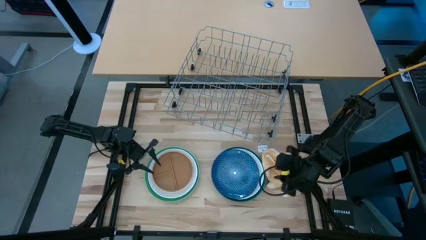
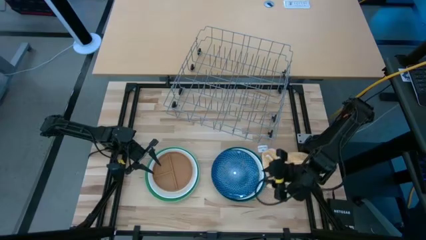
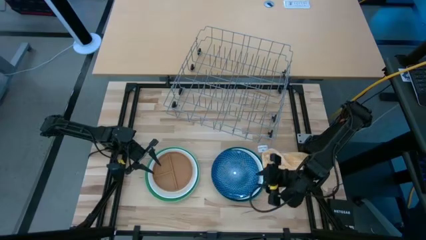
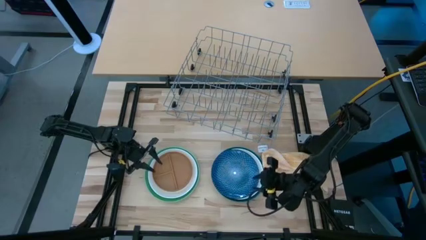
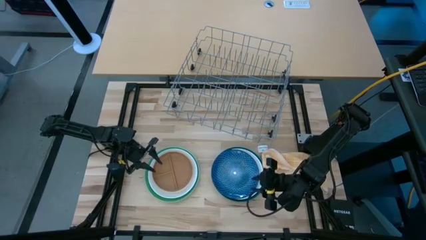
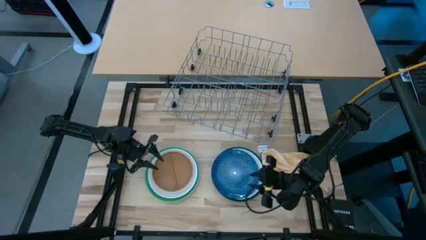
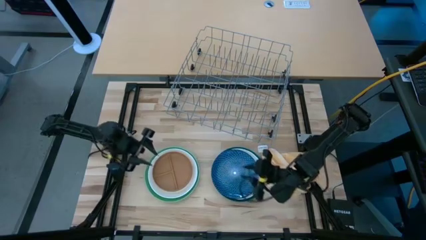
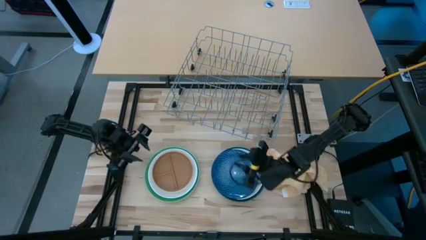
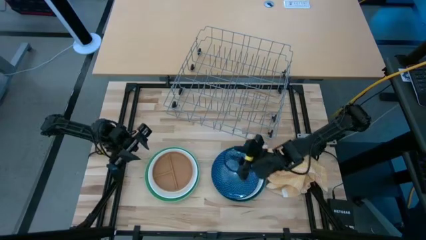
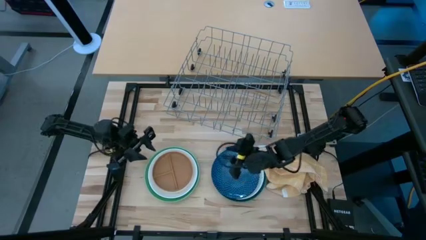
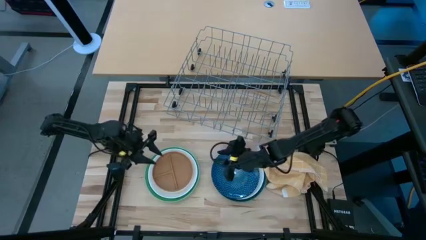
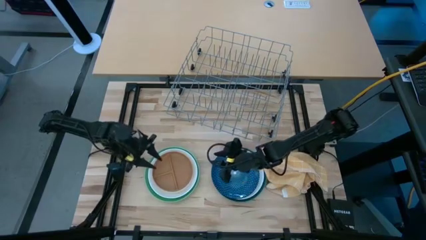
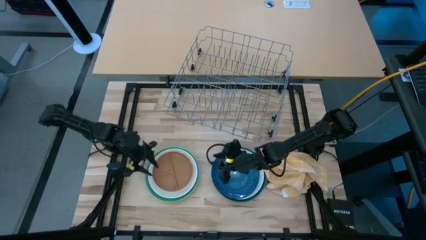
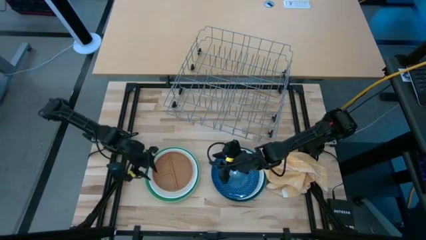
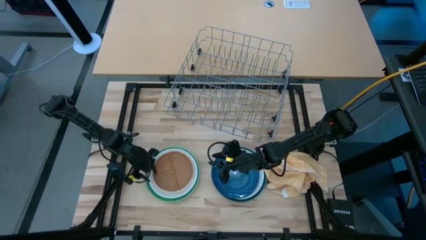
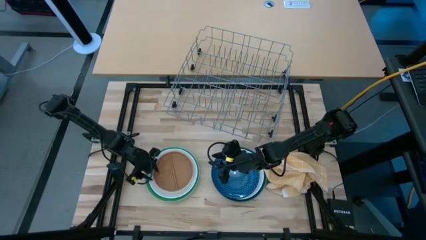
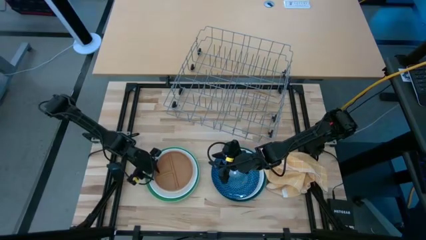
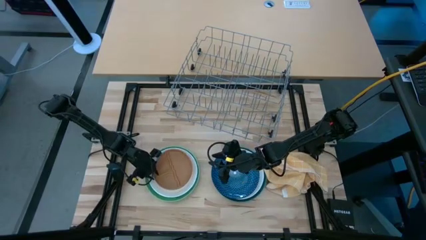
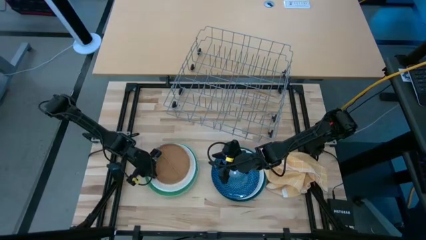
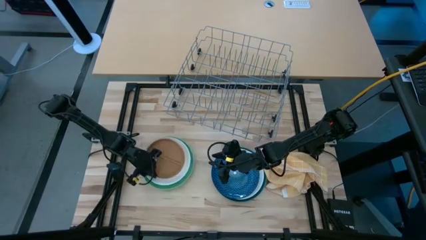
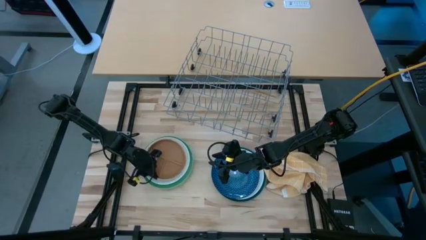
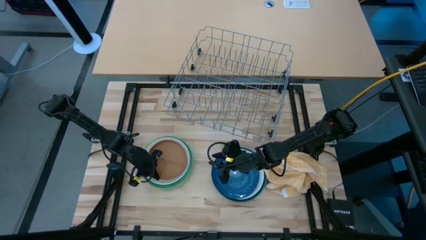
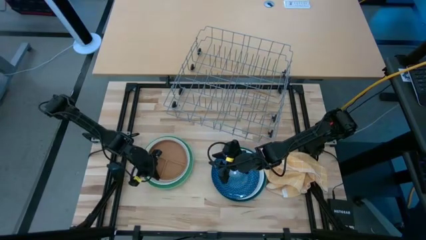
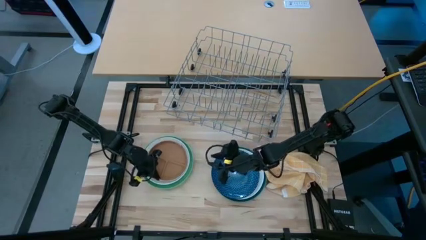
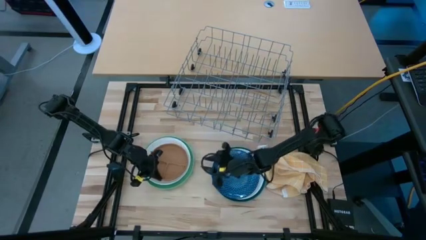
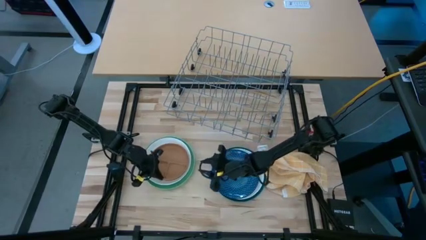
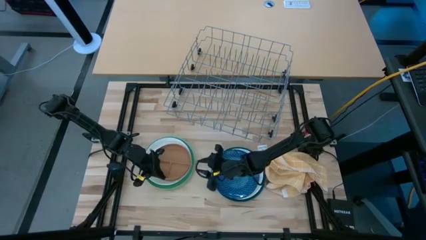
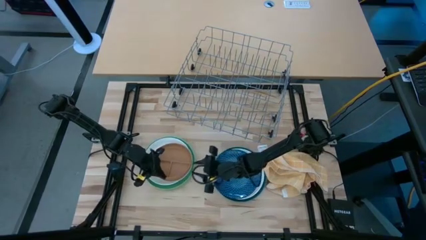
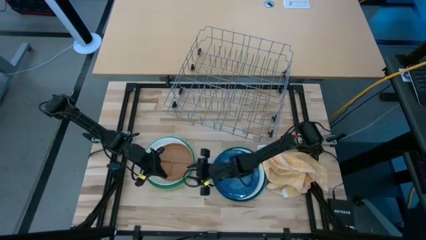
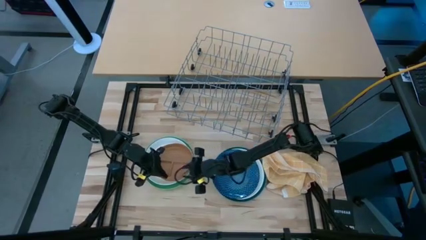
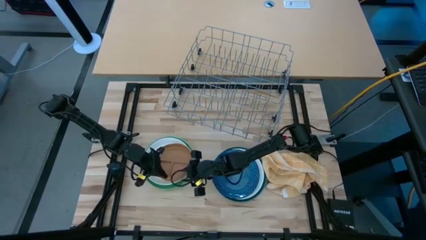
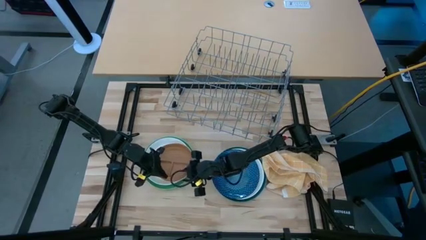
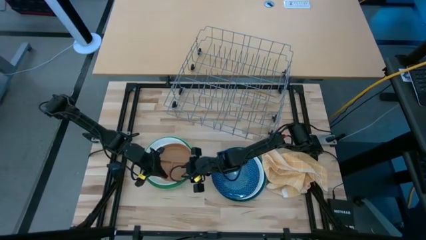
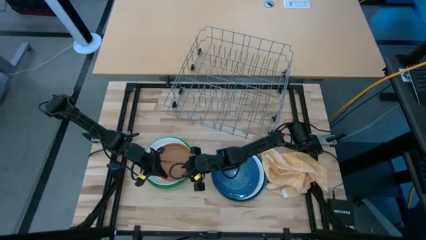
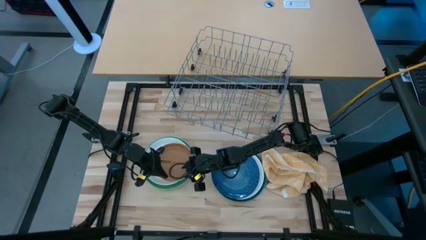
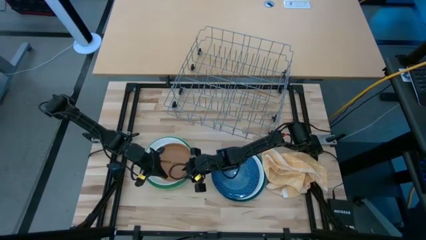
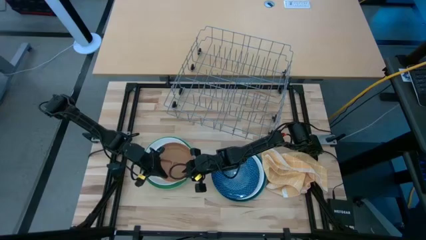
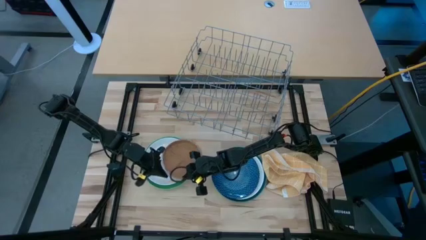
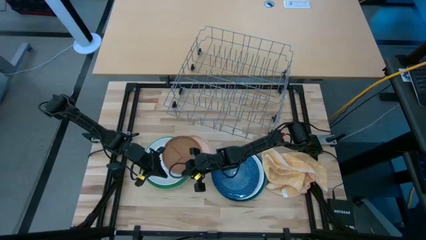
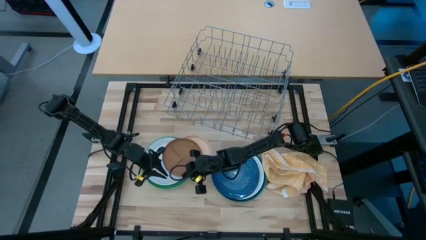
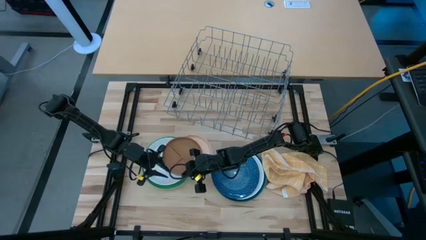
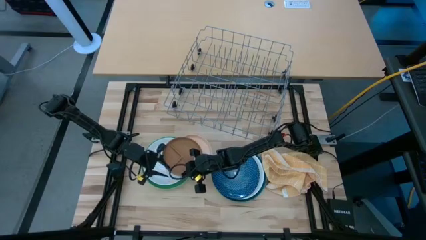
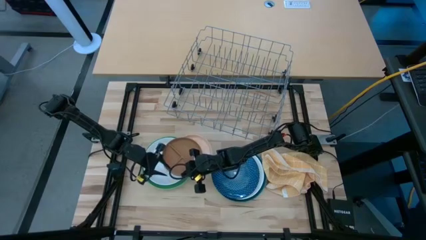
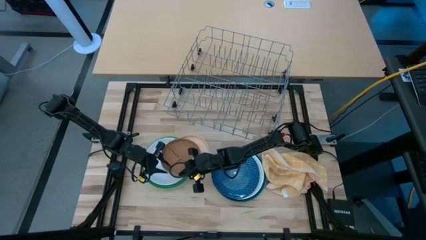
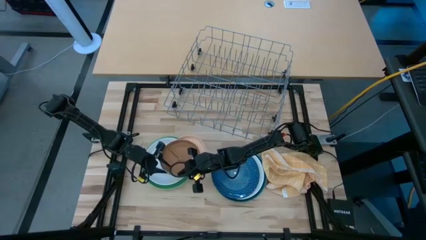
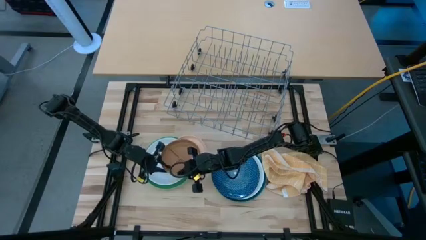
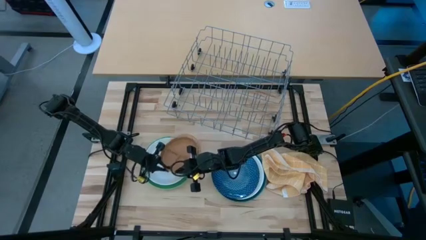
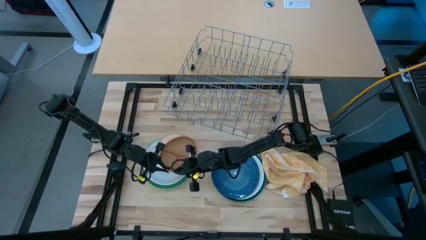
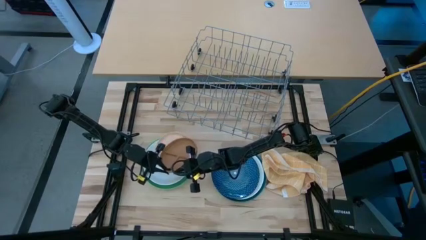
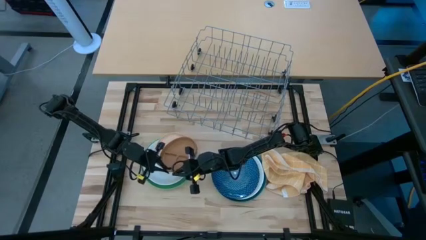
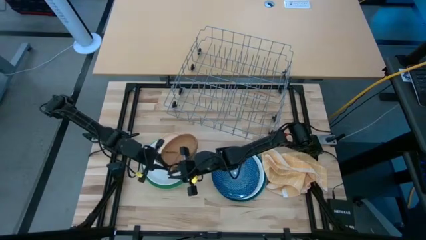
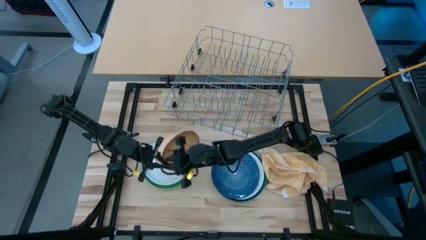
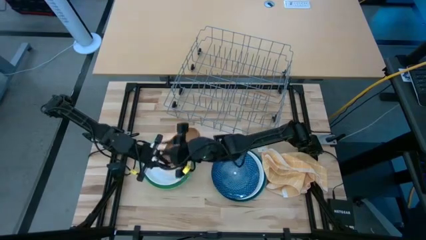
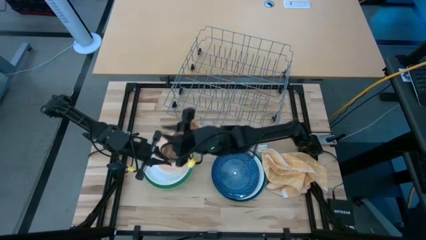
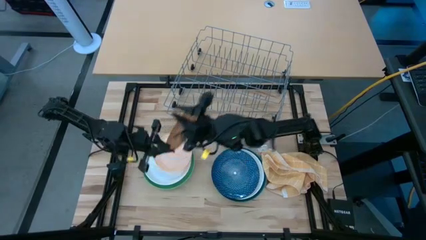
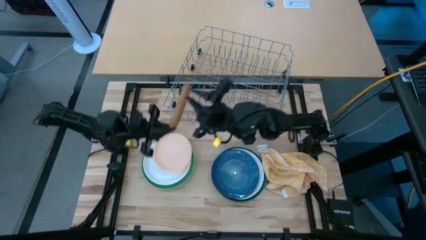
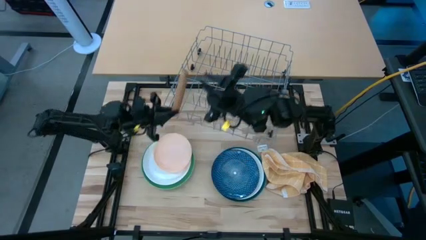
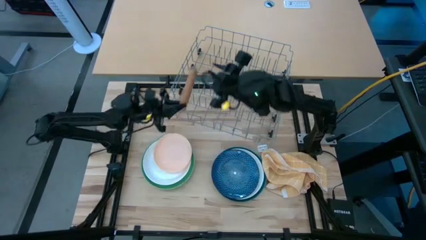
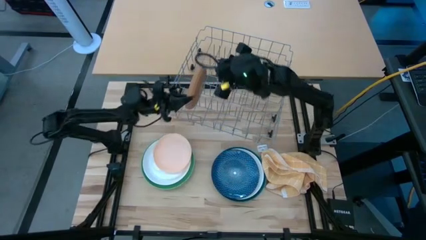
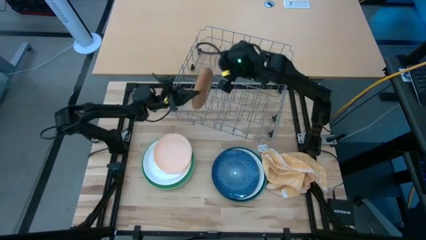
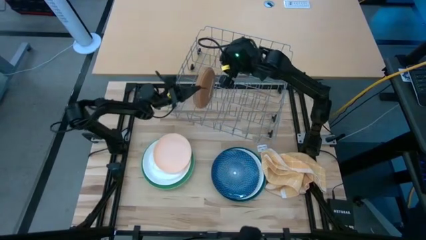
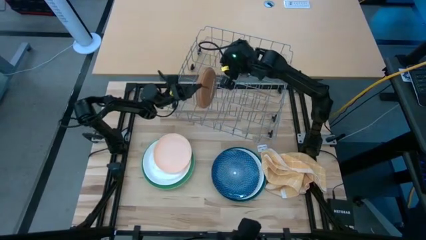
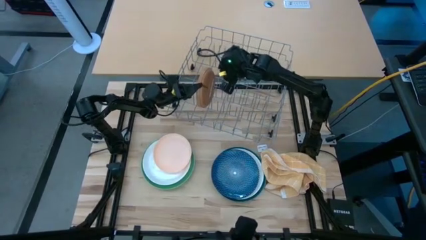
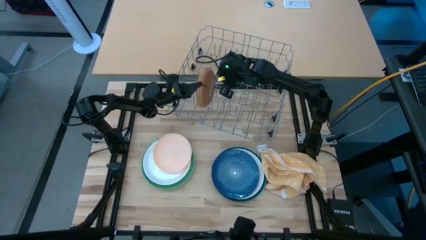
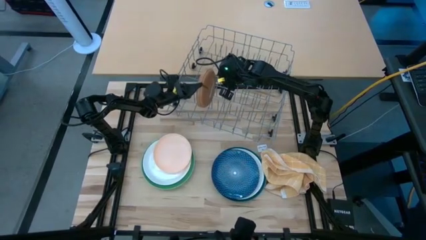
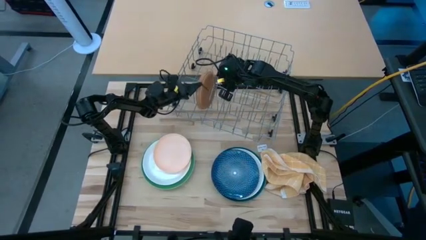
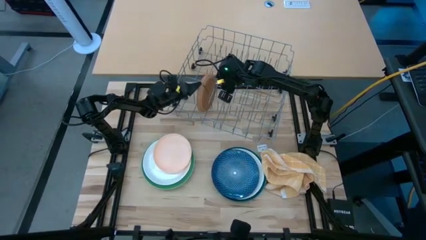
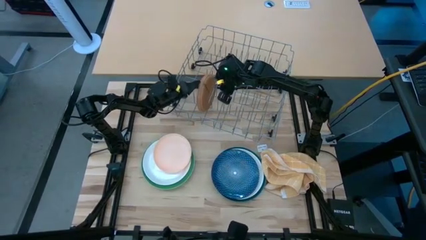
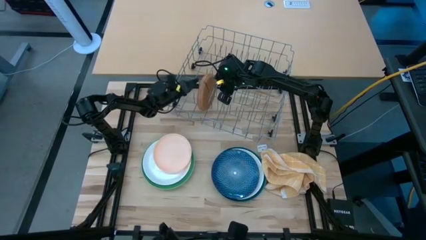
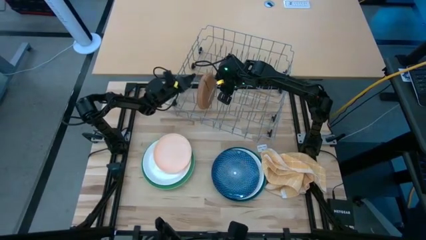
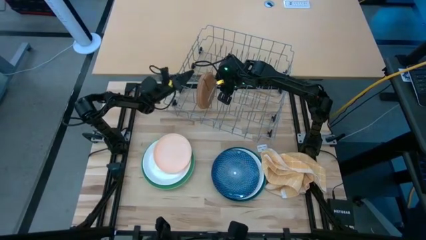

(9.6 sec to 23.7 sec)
Task: Sort dishes
Put the brown plate in the dish rack
